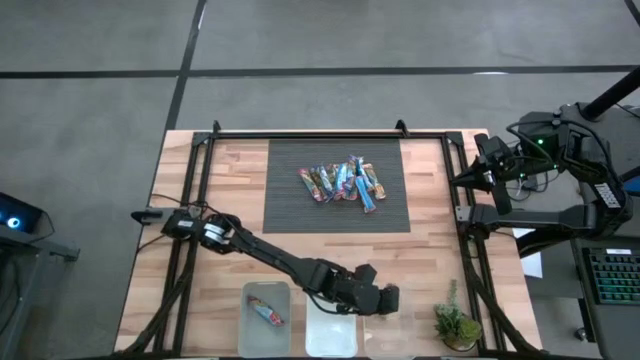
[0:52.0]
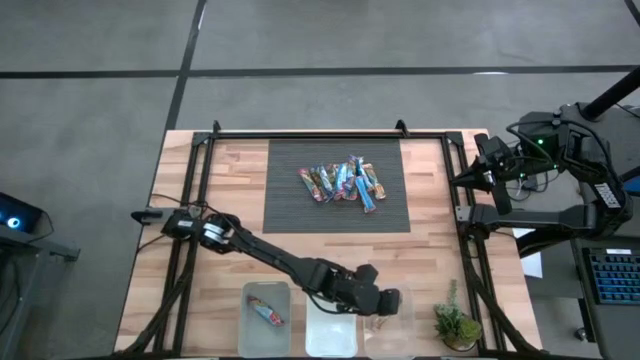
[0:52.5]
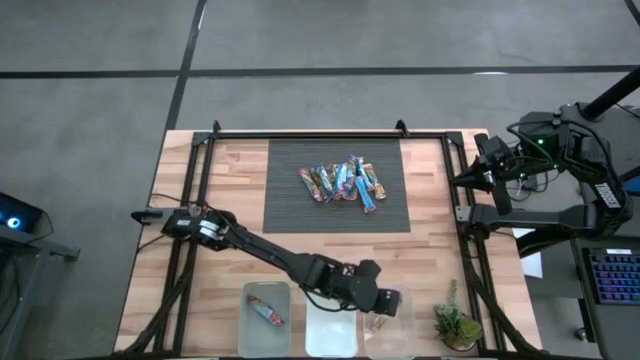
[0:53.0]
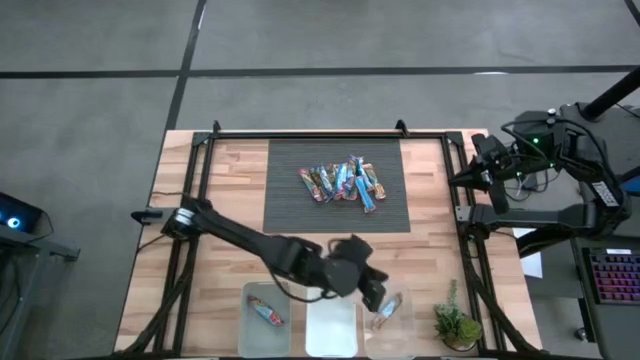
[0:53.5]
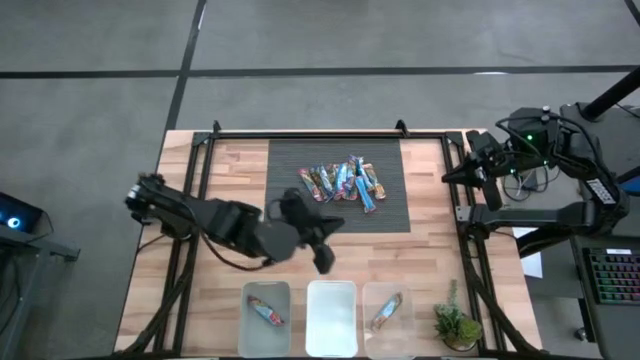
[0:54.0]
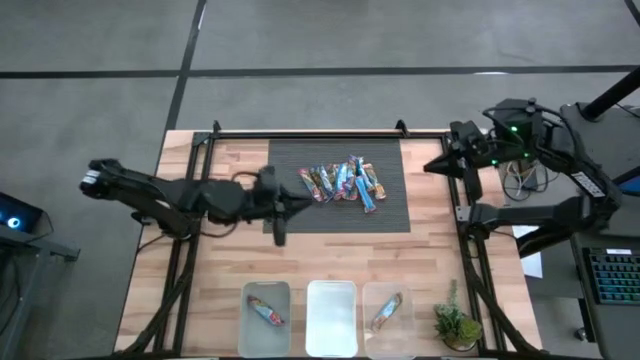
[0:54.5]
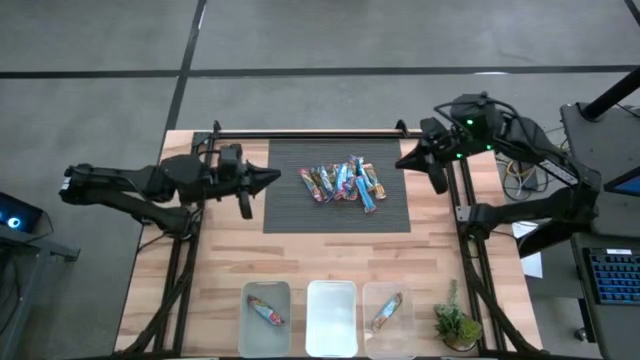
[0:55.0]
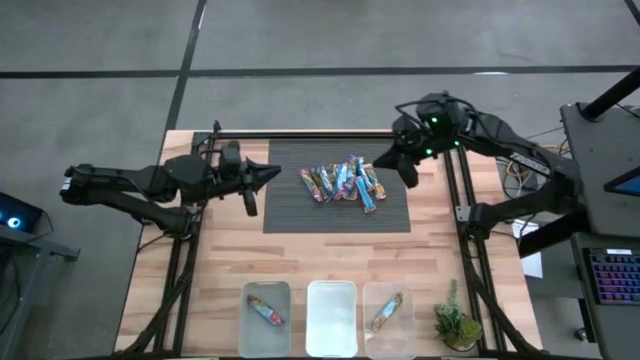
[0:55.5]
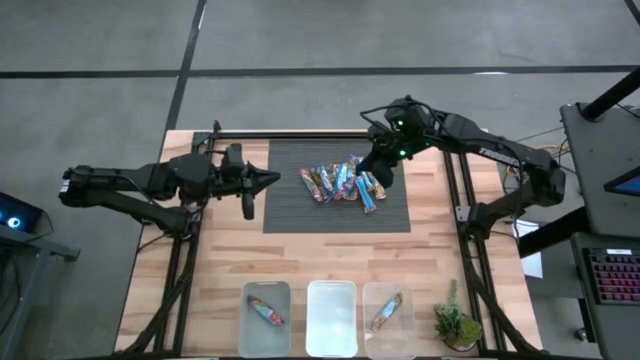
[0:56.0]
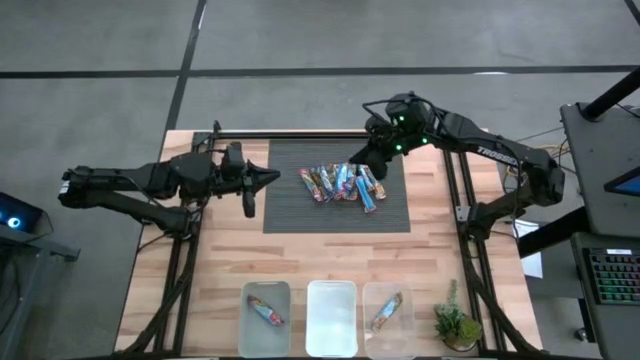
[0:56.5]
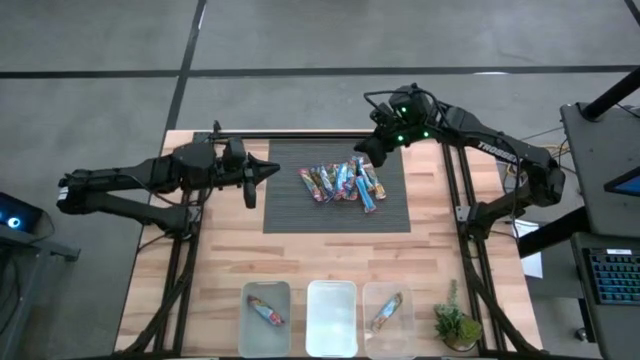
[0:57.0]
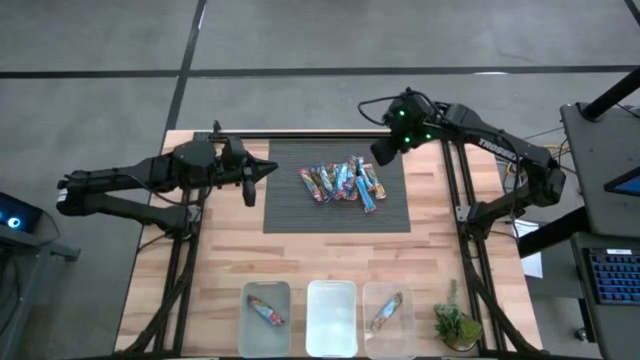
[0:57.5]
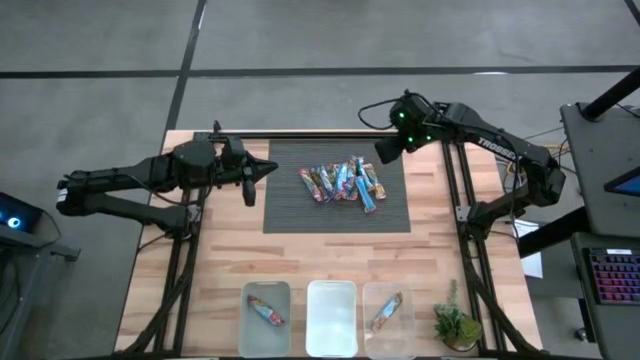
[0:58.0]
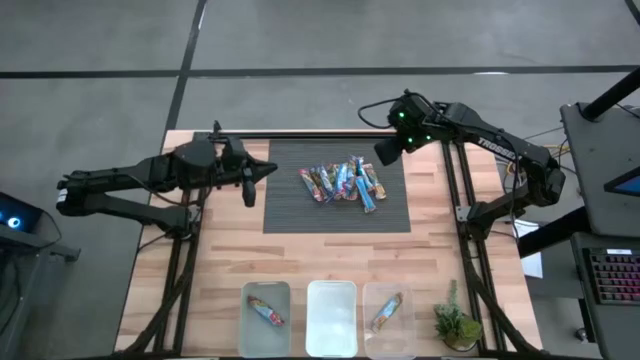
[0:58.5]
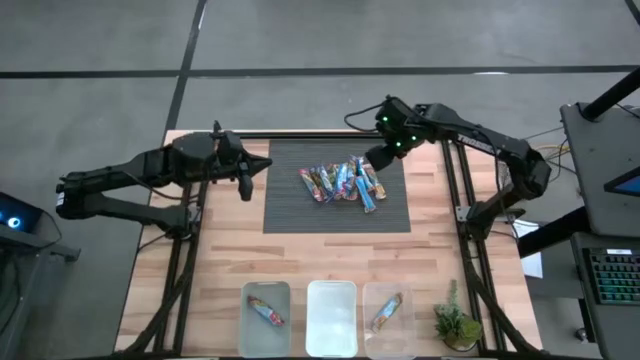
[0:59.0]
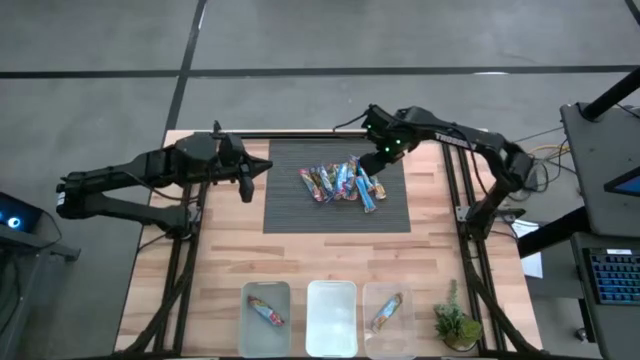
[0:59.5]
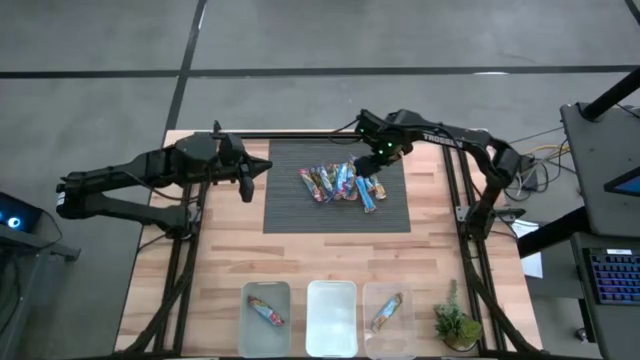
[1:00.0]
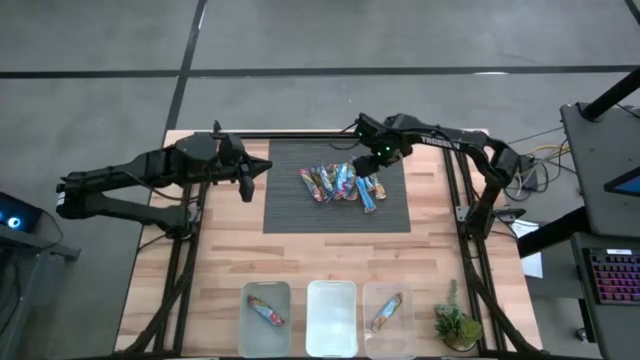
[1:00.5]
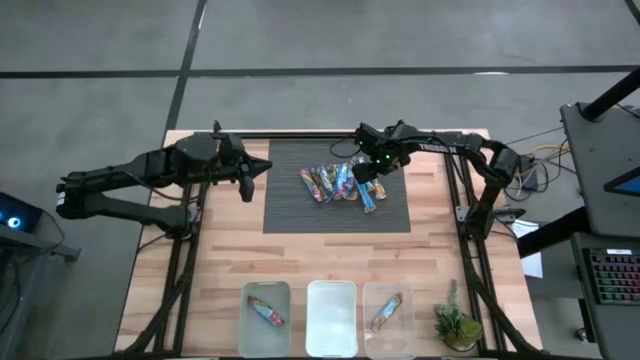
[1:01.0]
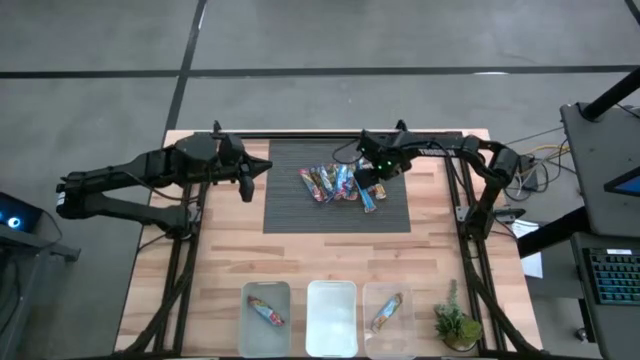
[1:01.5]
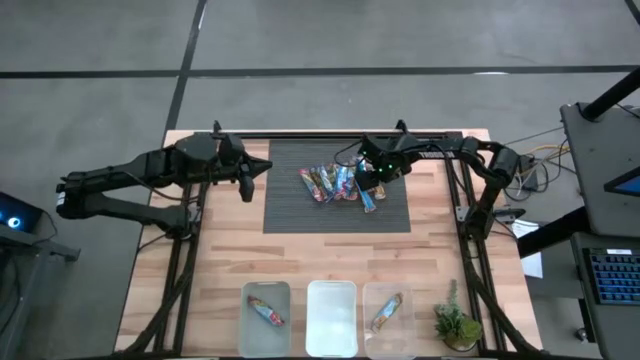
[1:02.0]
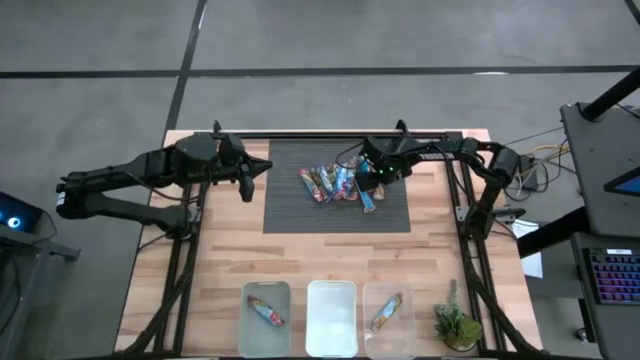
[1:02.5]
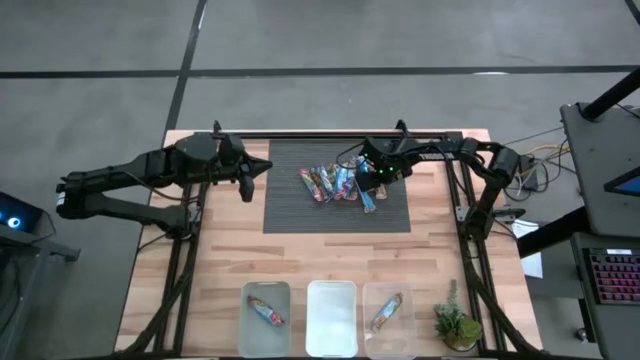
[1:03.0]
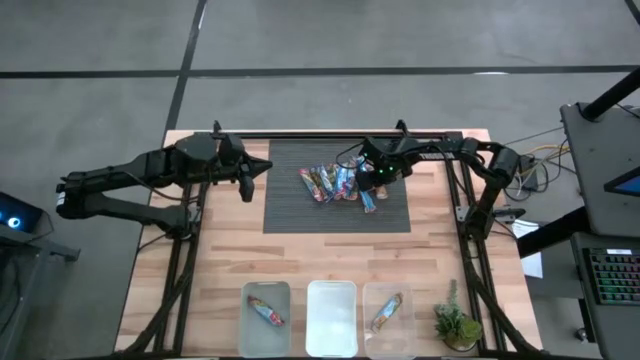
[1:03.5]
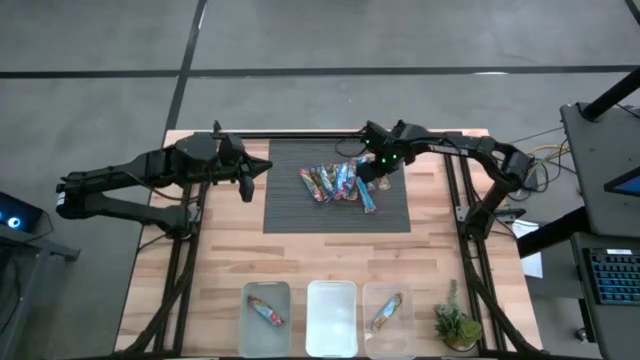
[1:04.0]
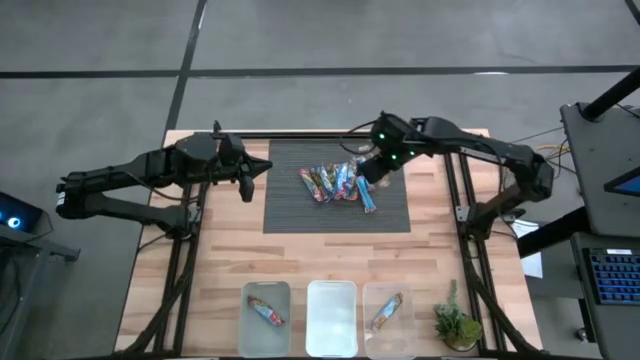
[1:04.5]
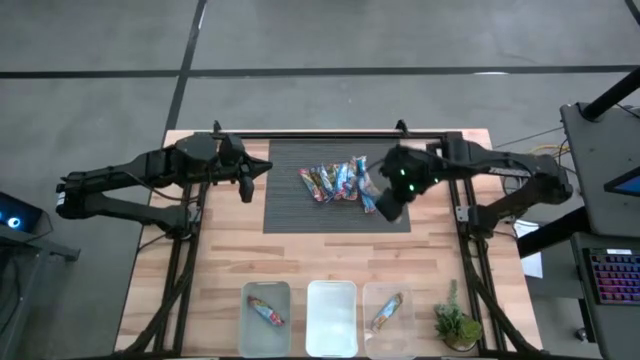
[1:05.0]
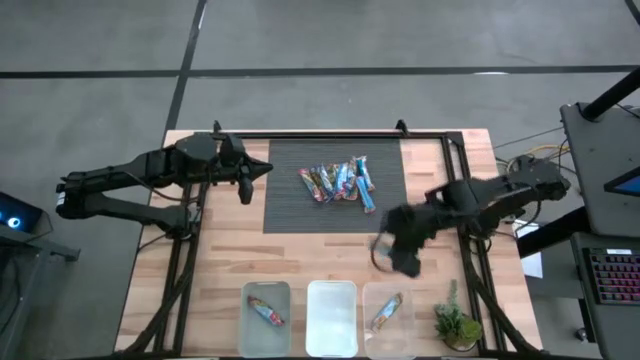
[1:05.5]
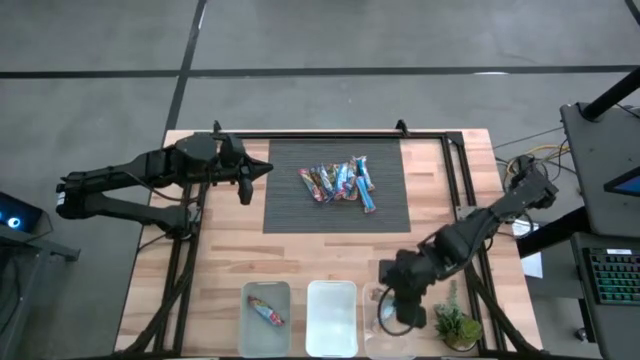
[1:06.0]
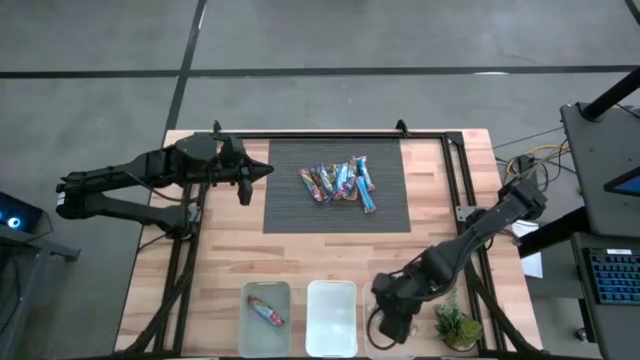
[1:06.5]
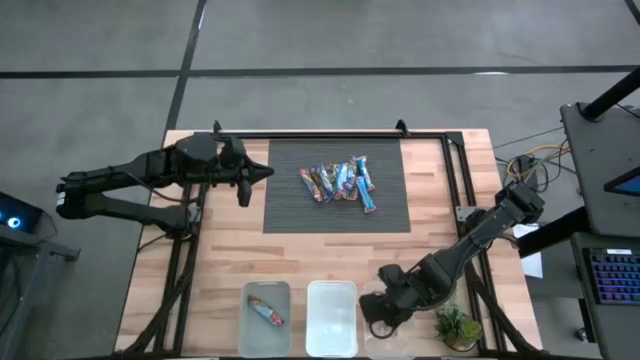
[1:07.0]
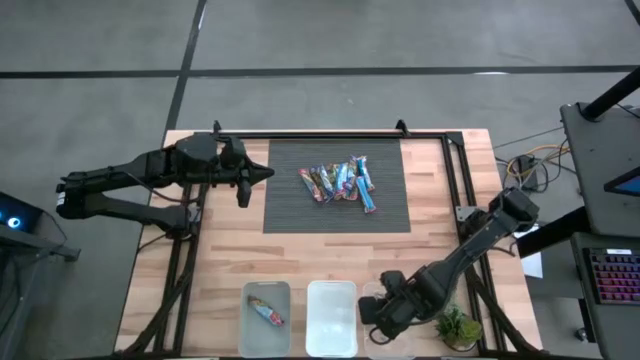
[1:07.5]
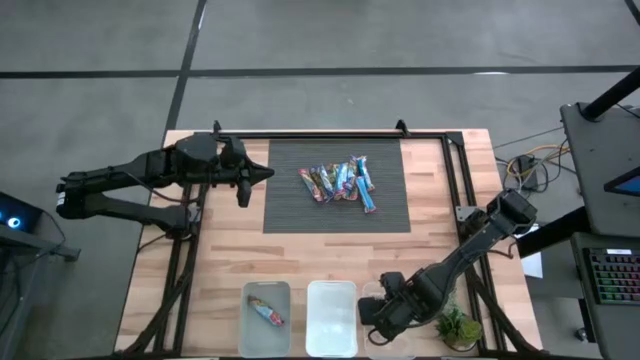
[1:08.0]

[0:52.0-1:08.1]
Task: Pick and place Granola Bars by type
Put the yellow granola bar into the transparent bin

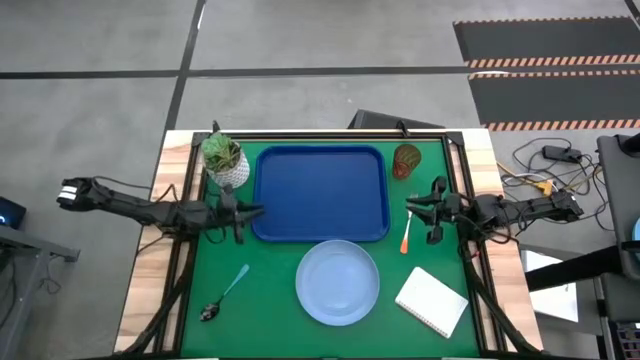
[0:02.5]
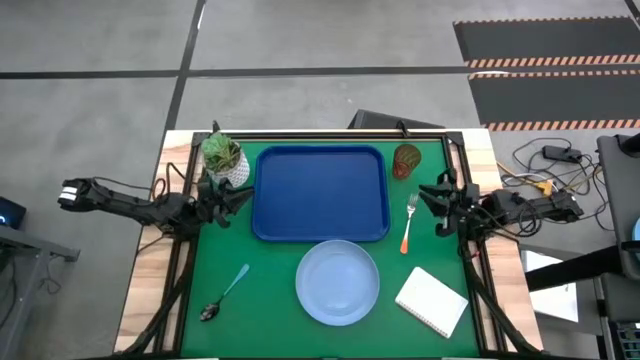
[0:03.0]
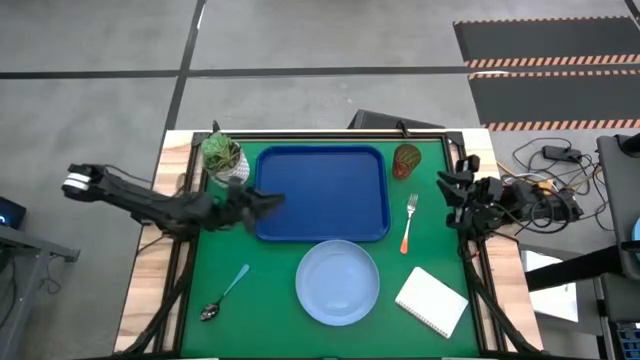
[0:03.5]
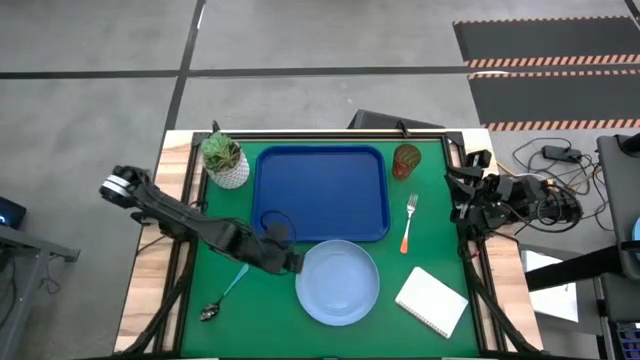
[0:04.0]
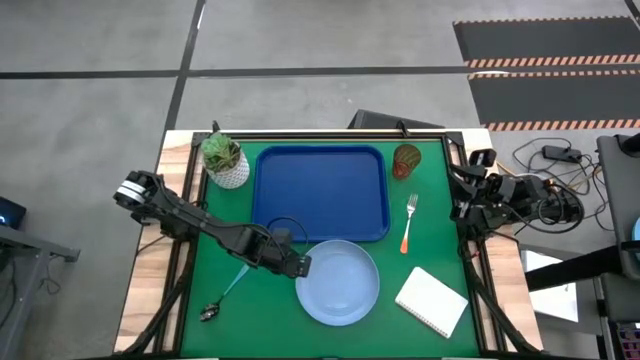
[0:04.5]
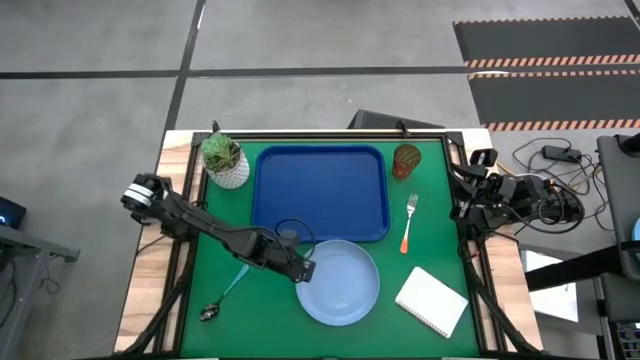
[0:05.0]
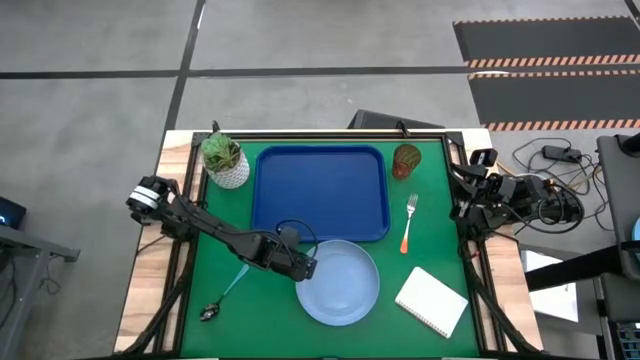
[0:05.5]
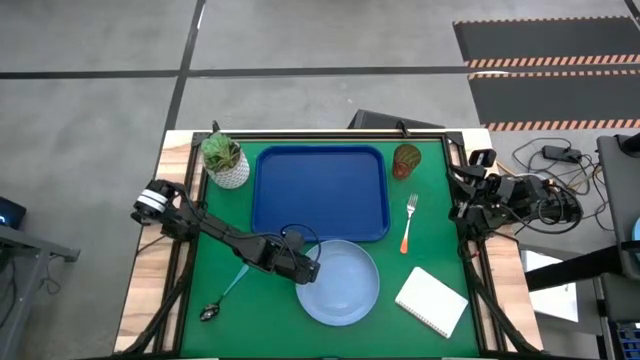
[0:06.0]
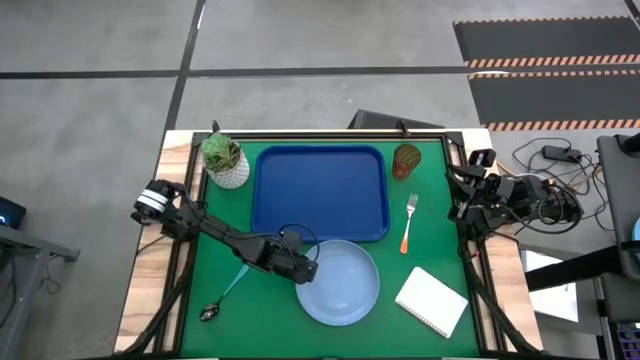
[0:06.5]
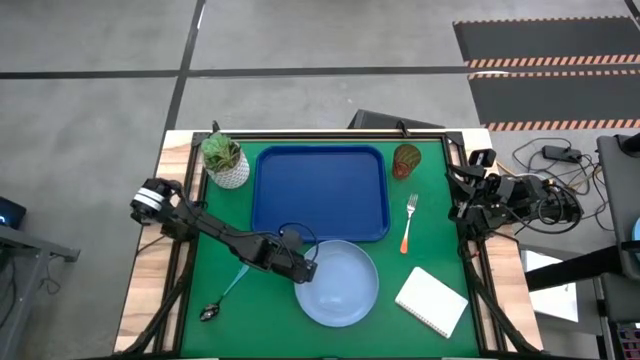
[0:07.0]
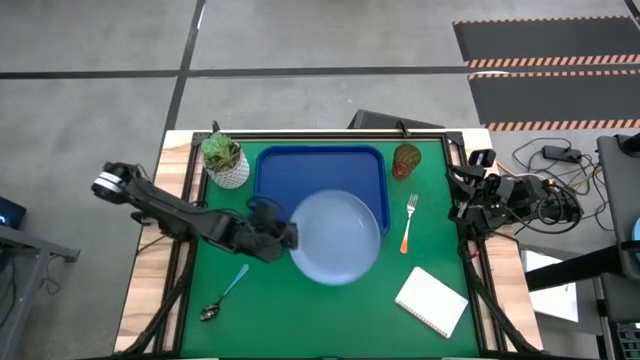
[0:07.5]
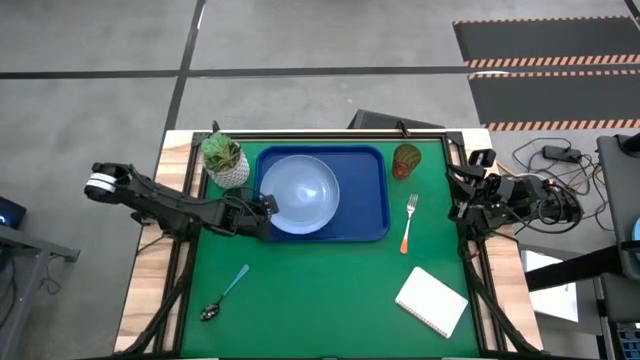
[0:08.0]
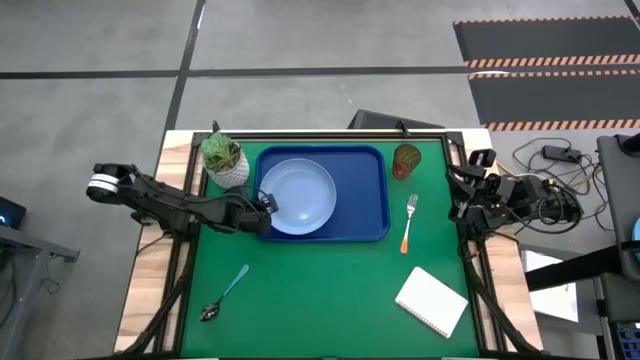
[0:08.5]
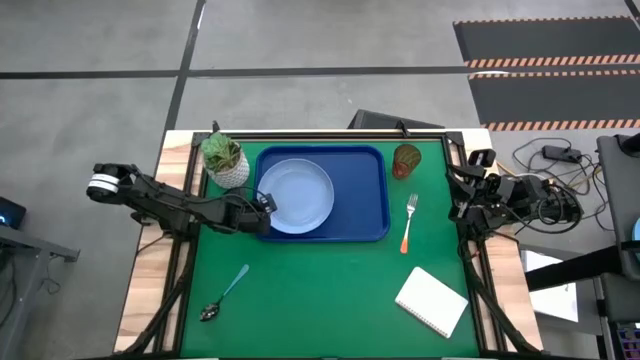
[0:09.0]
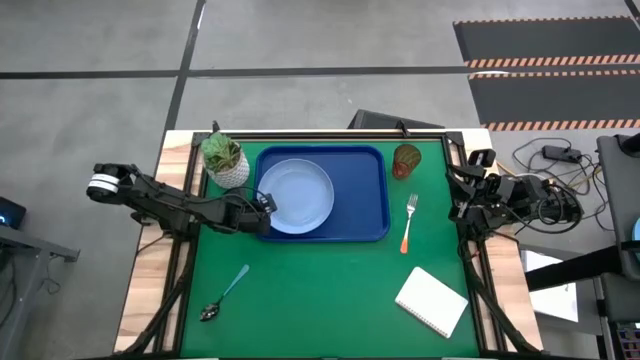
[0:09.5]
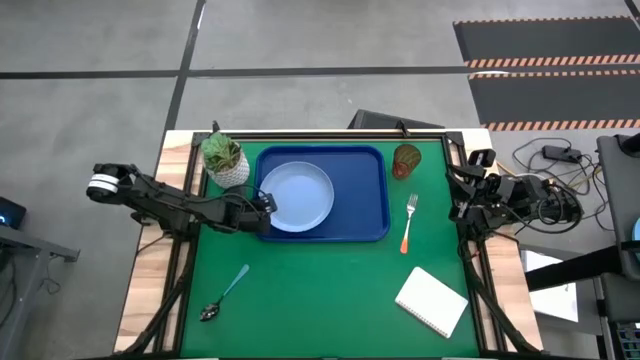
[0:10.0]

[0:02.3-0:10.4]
Task: Pick and place plate/cup/fork/spoon on tray
Put the light blue plate on the top of the blue serving tray
